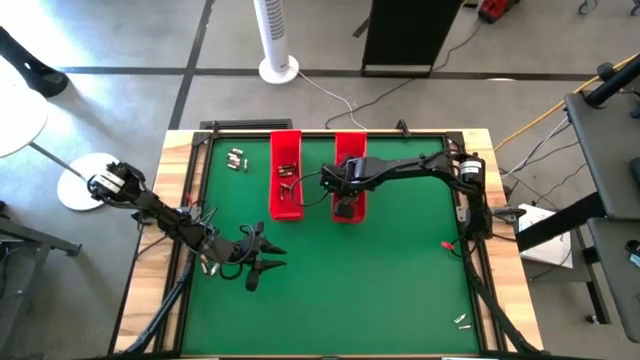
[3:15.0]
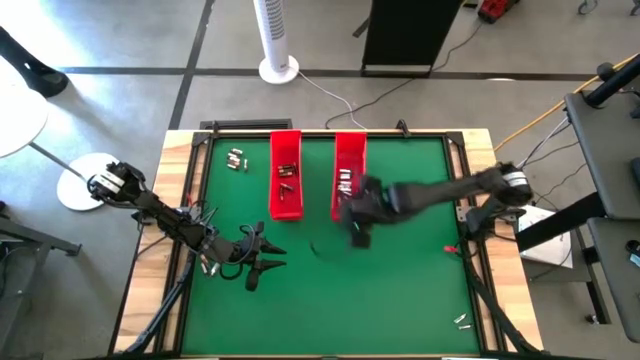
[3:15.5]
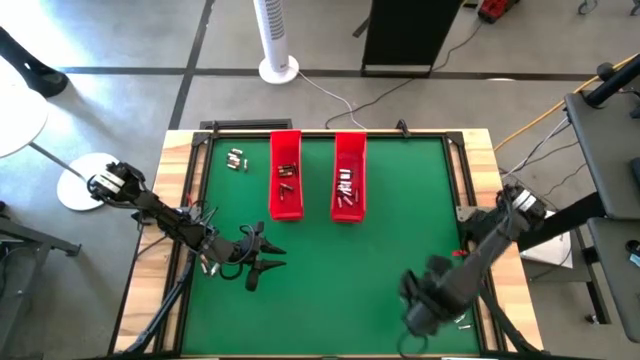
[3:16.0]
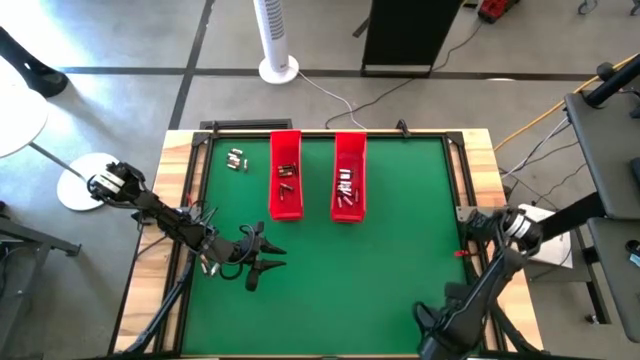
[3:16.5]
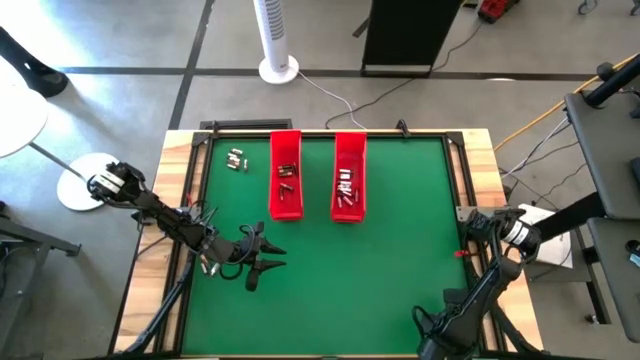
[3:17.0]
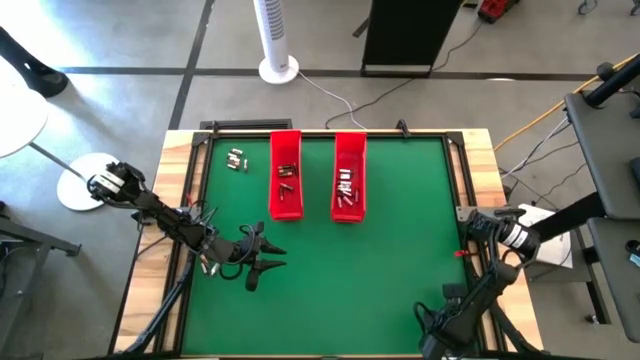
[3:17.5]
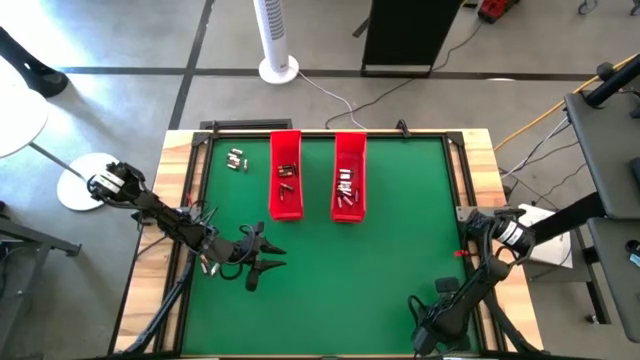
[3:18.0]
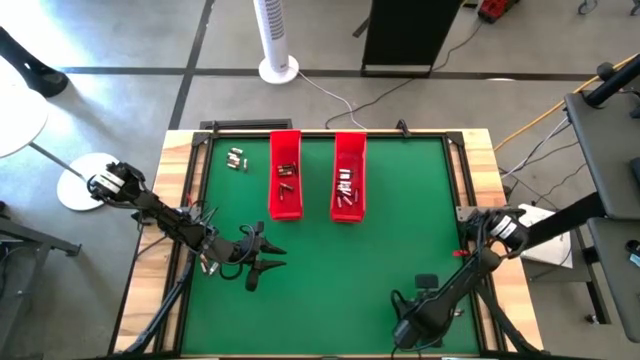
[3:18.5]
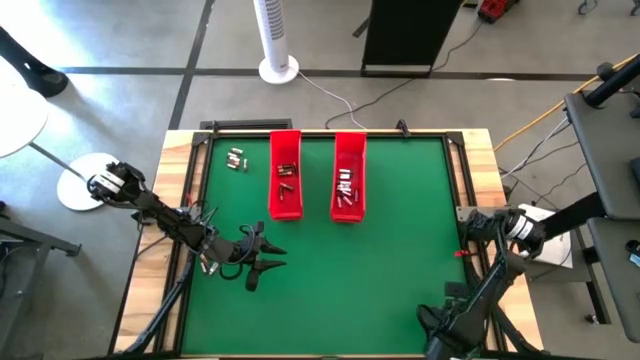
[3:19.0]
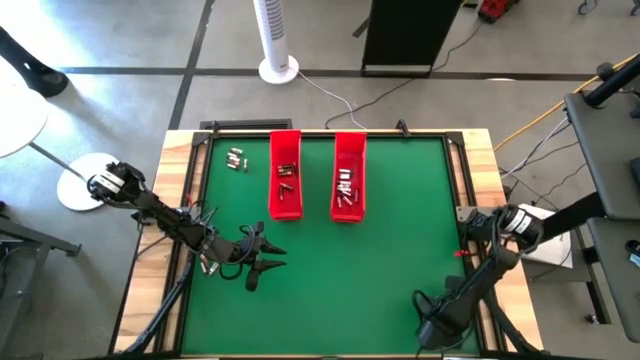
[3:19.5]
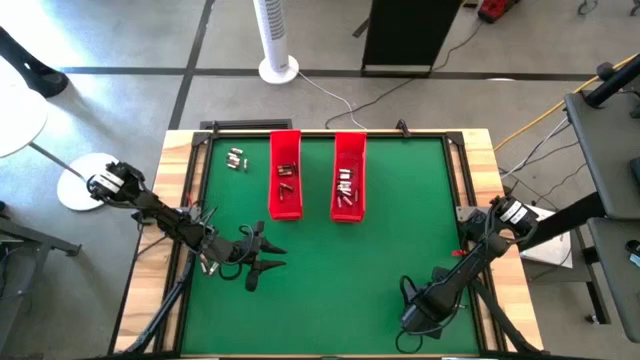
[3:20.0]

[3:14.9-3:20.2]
Task: Sort batteries
Put the silver battery into the right red bin

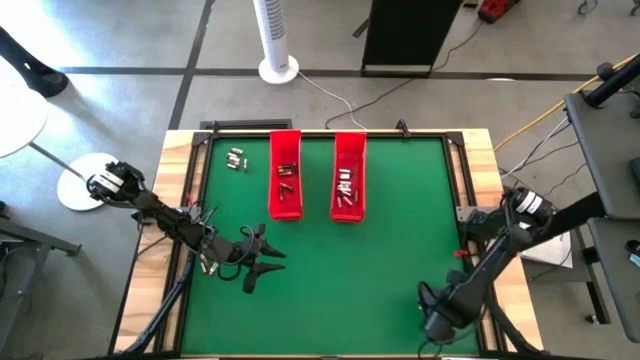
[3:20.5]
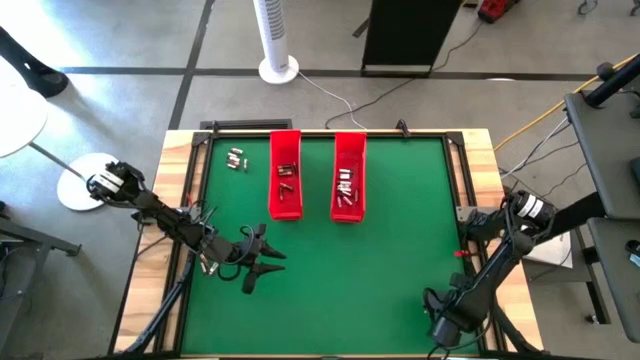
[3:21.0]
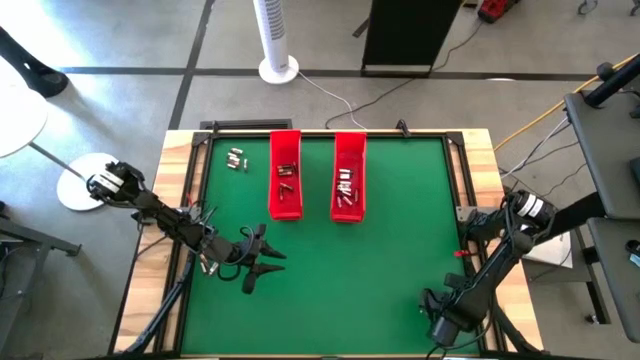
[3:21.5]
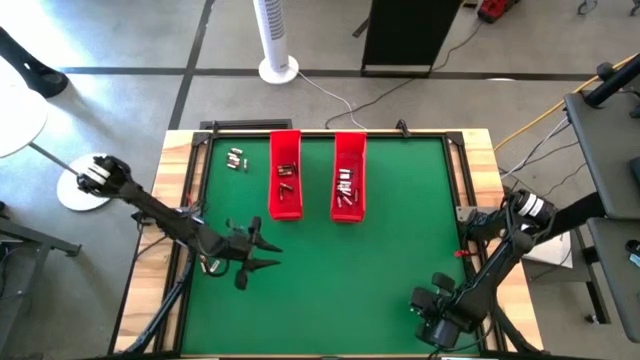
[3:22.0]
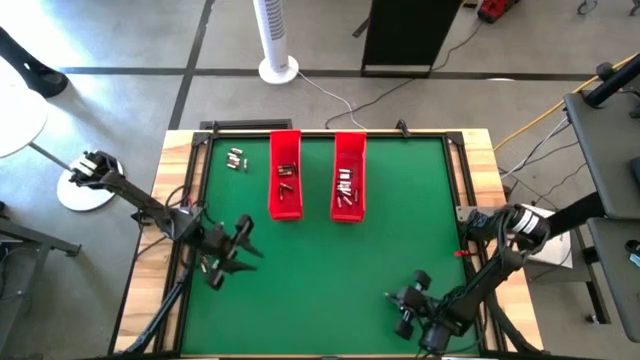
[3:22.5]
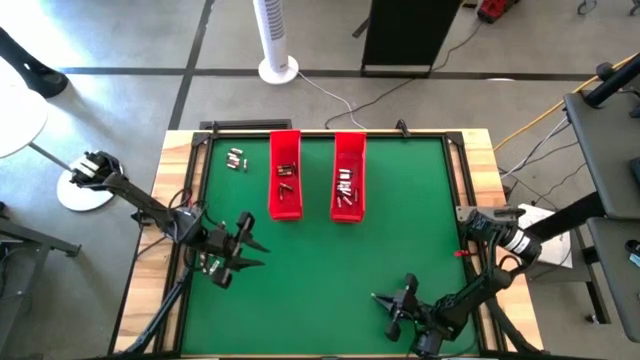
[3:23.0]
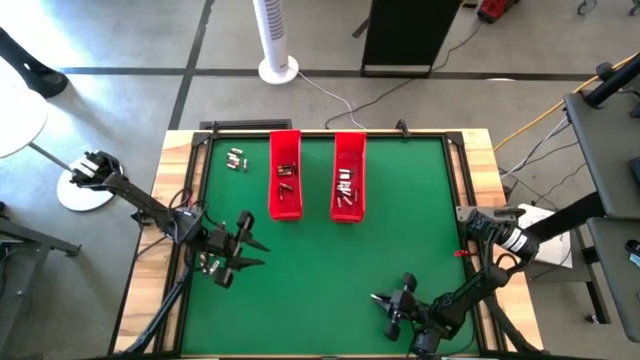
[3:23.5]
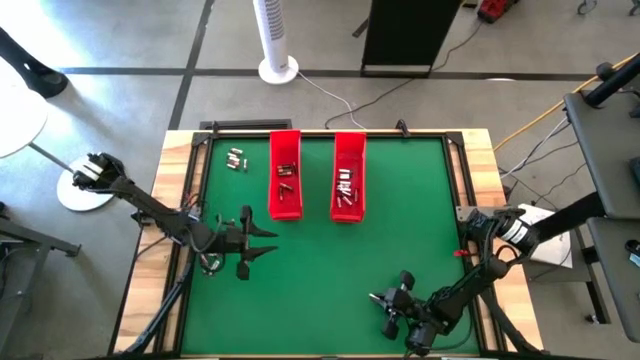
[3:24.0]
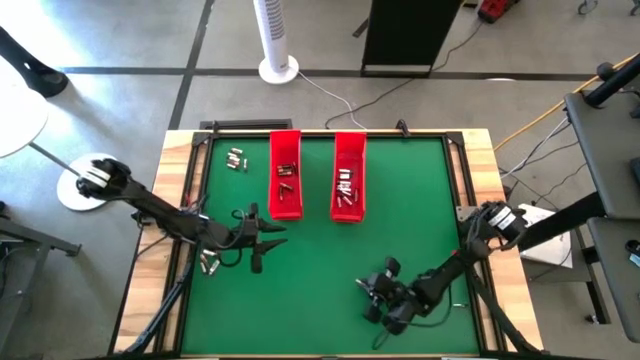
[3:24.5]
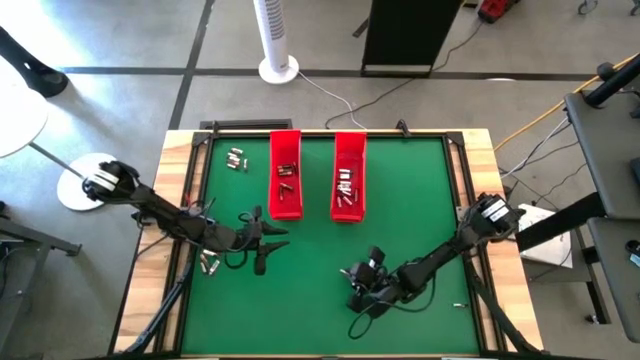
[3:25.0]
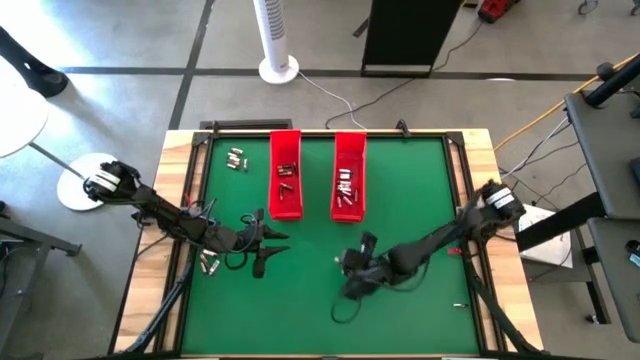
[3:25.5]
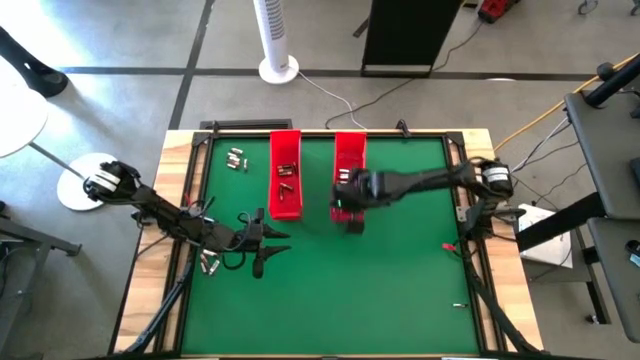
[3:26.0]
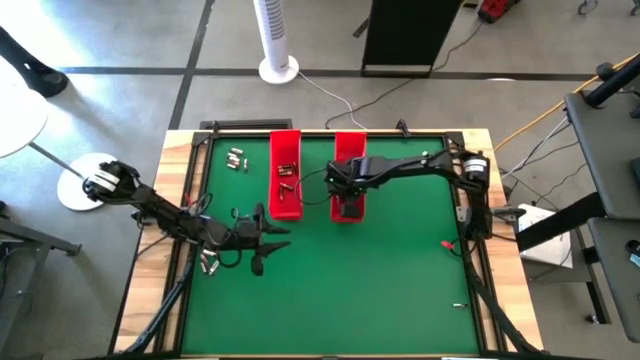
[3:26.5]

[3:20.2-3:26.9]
Put the silver battery into the right red bin

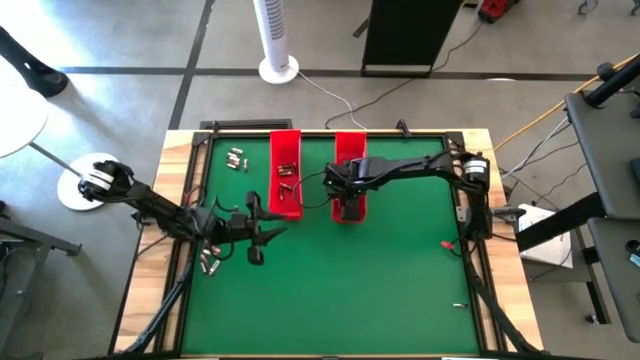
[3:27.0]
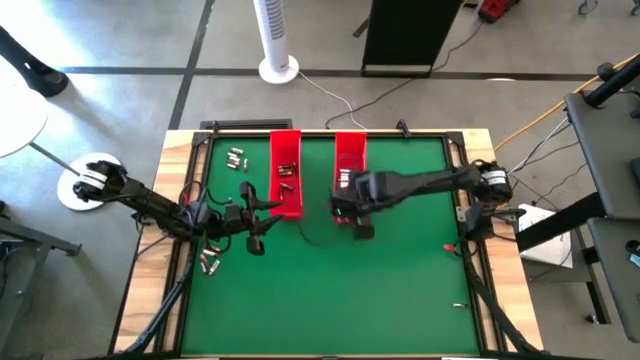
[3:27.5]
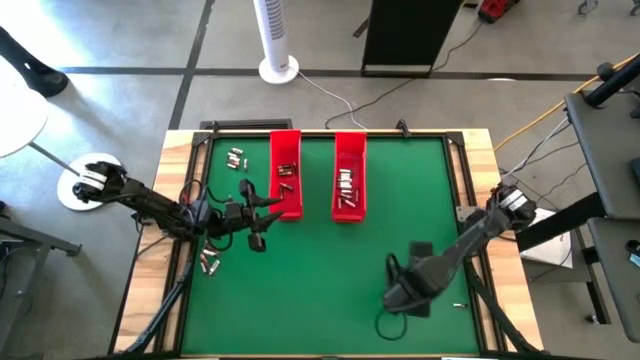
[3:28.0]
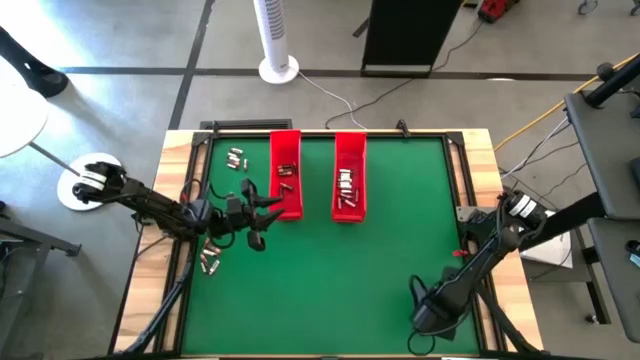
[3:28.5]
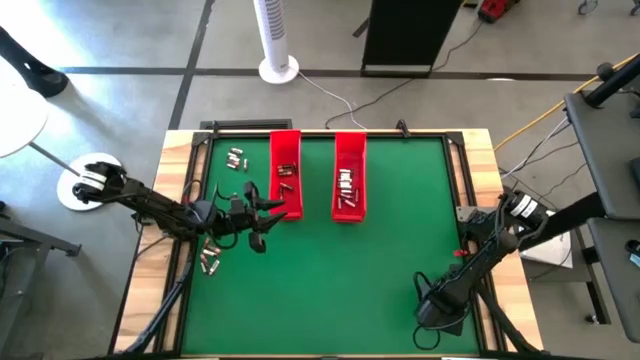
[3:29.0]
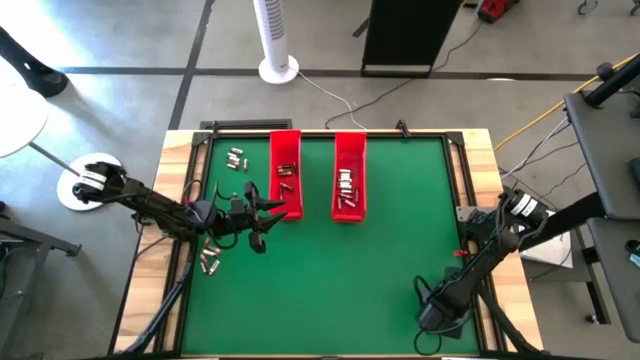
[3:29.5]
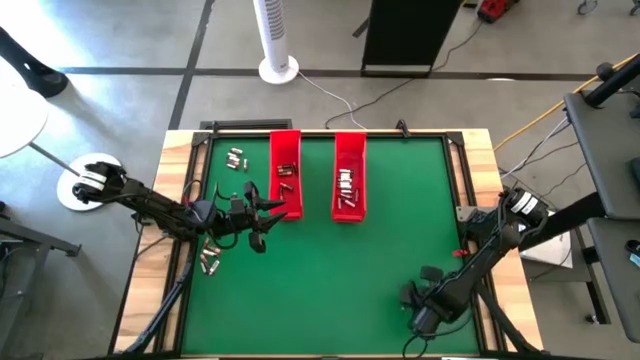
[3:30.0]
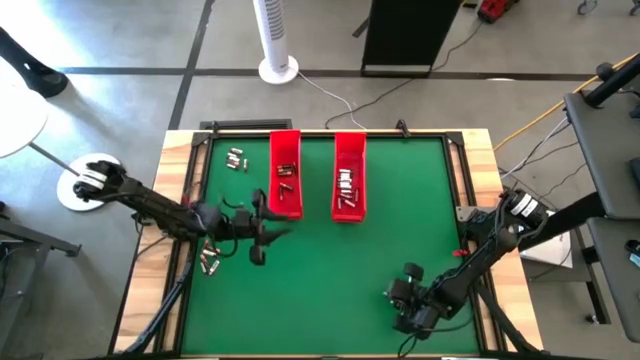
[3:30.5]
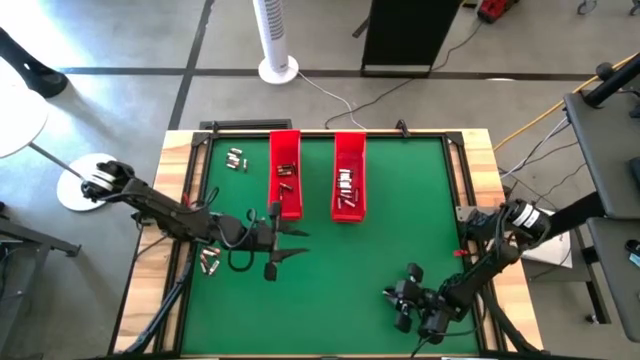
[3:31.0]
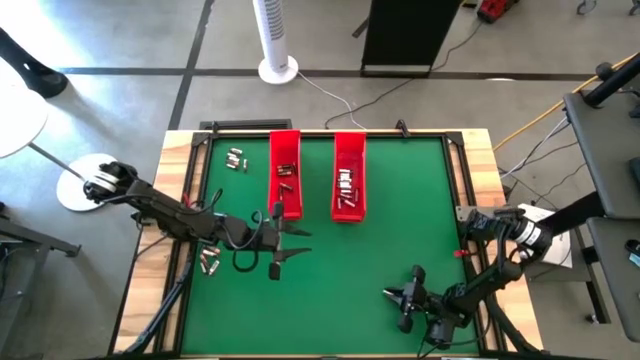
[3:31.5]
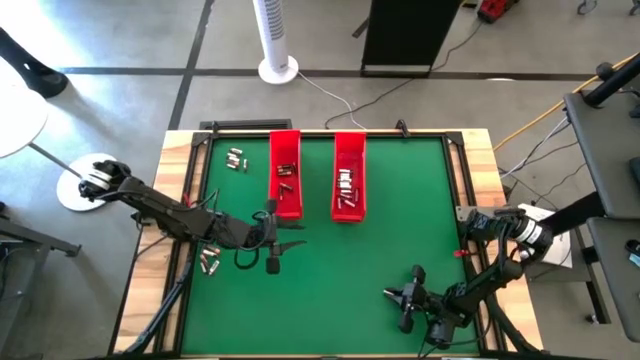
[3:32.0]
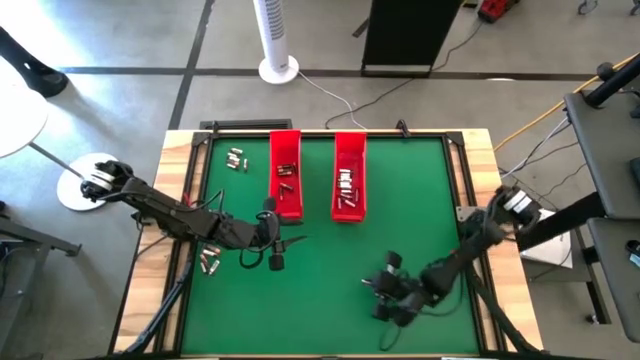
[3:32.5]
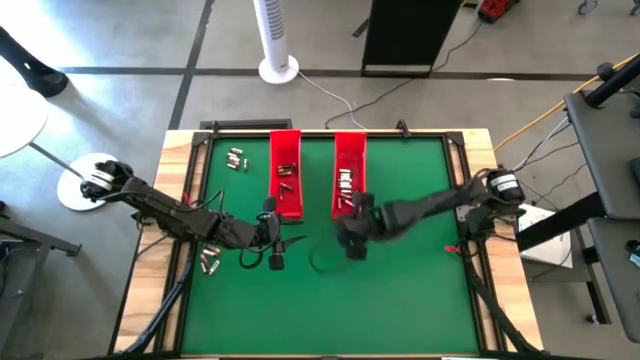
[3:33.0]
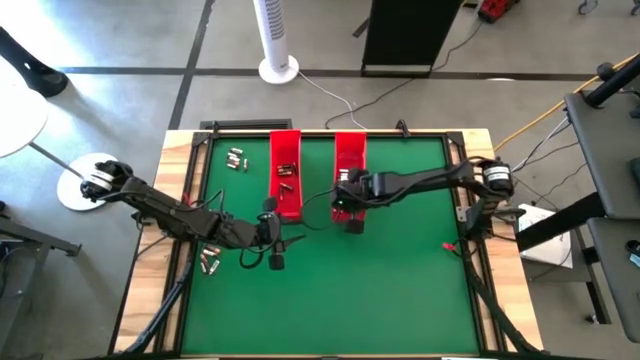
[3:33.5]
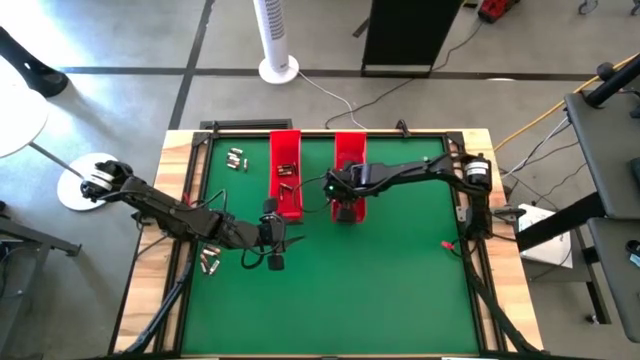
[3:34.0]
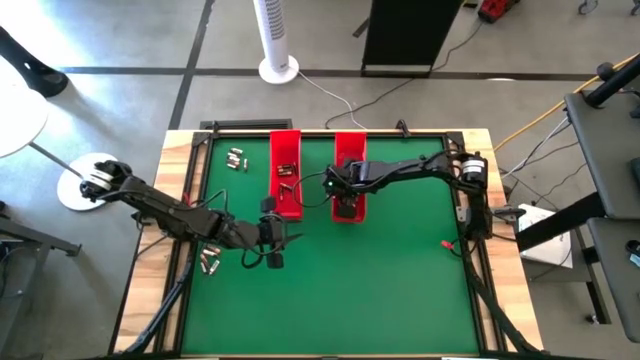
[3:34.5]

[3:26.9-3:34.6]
Put the silver battery into the right red bin
